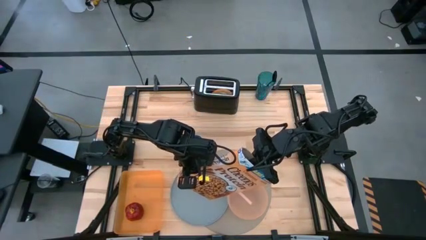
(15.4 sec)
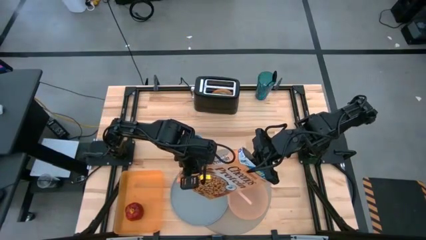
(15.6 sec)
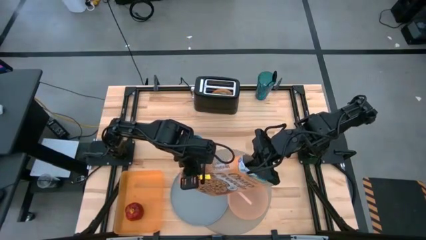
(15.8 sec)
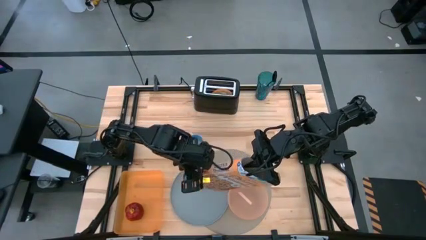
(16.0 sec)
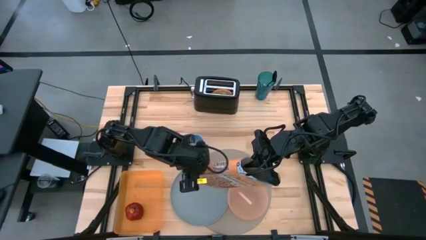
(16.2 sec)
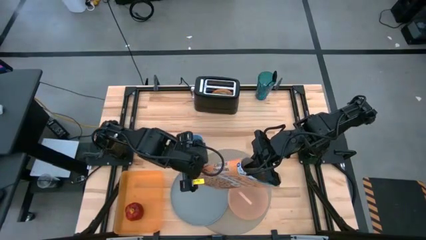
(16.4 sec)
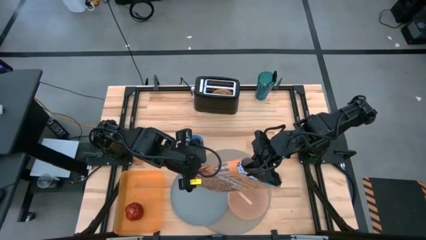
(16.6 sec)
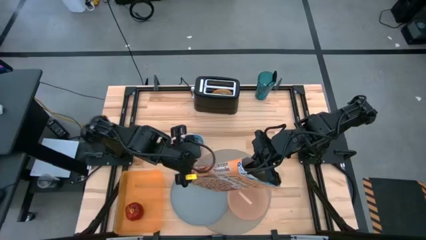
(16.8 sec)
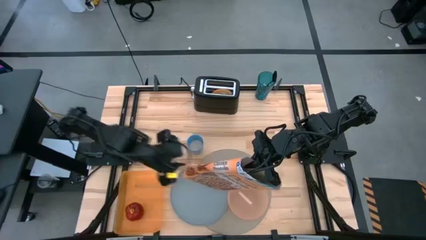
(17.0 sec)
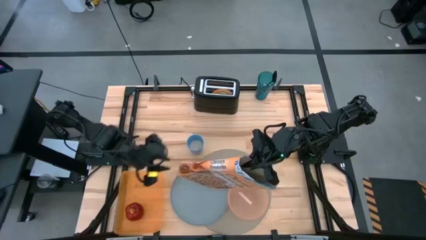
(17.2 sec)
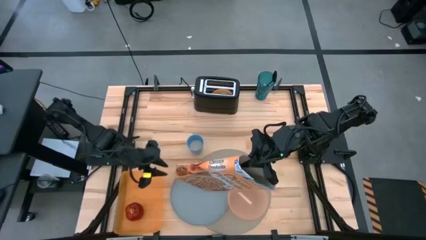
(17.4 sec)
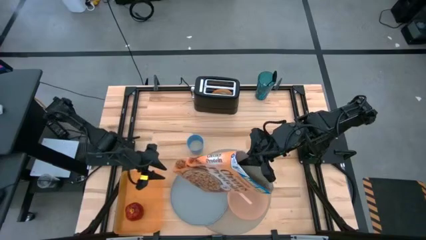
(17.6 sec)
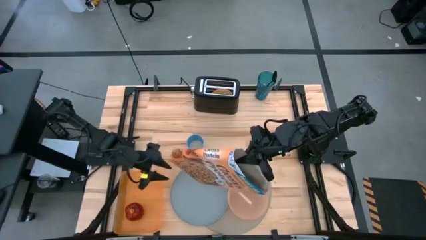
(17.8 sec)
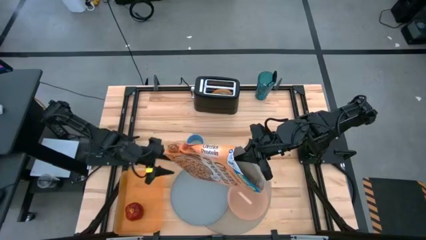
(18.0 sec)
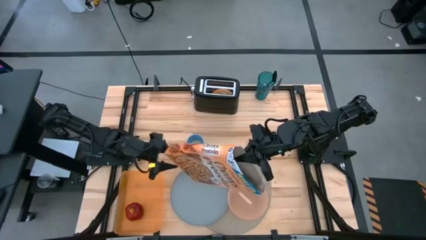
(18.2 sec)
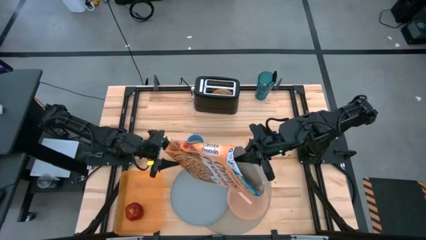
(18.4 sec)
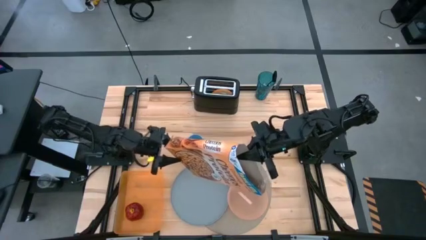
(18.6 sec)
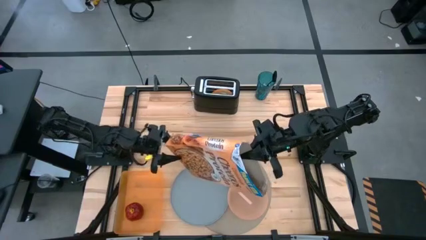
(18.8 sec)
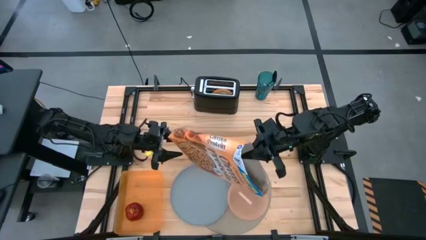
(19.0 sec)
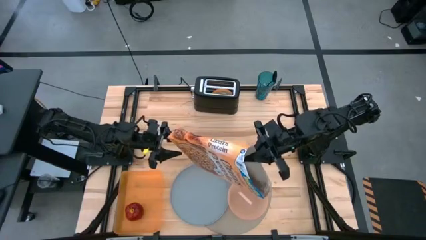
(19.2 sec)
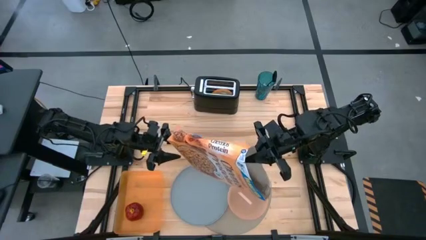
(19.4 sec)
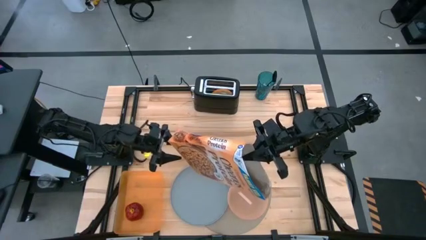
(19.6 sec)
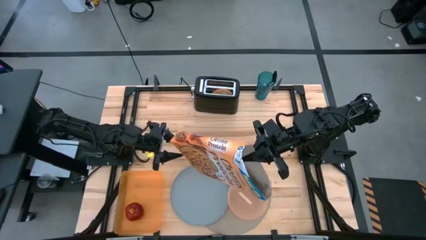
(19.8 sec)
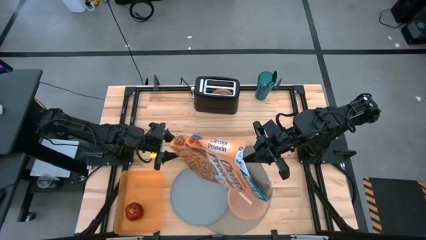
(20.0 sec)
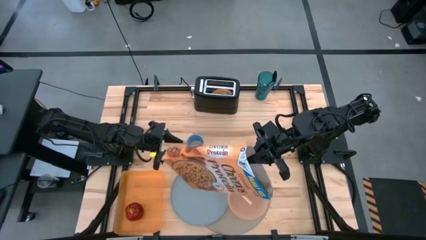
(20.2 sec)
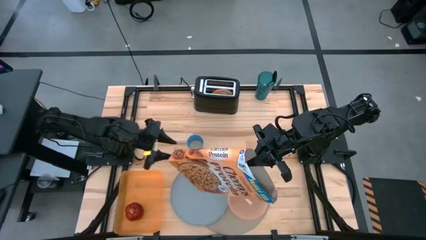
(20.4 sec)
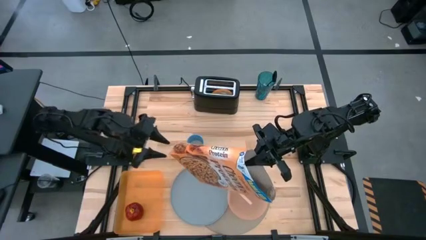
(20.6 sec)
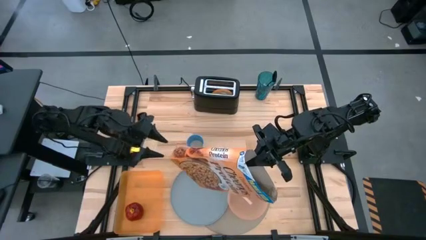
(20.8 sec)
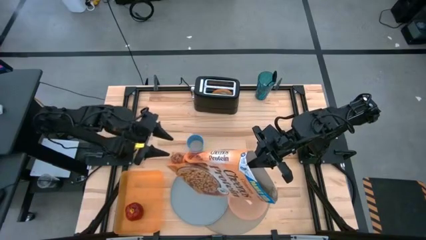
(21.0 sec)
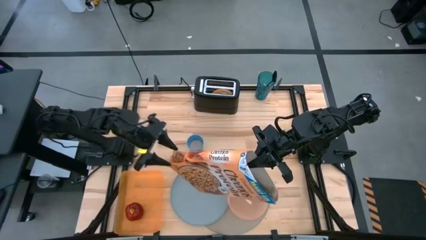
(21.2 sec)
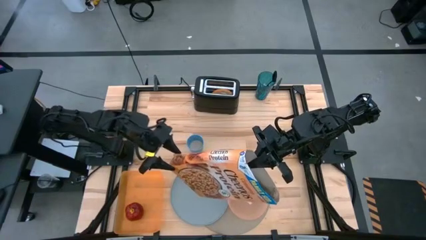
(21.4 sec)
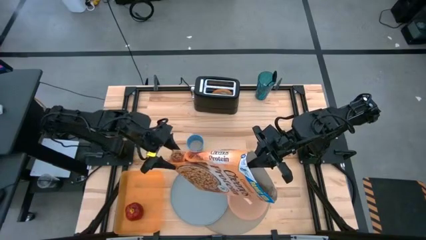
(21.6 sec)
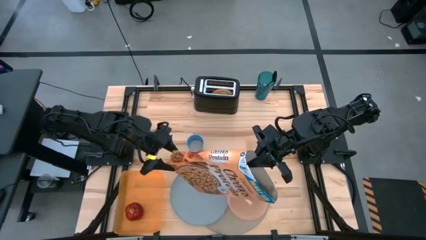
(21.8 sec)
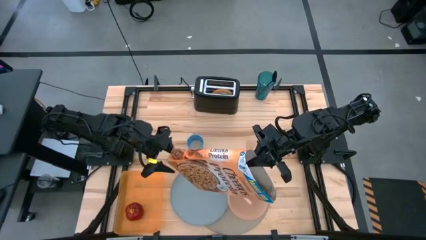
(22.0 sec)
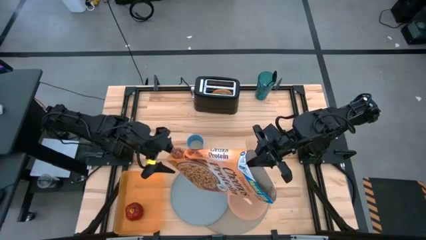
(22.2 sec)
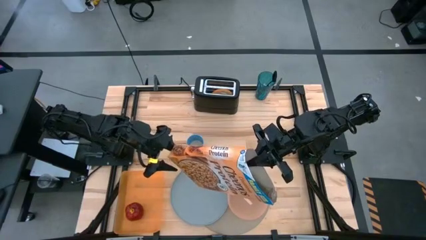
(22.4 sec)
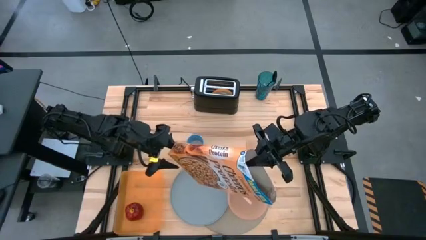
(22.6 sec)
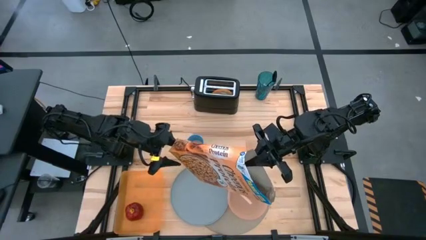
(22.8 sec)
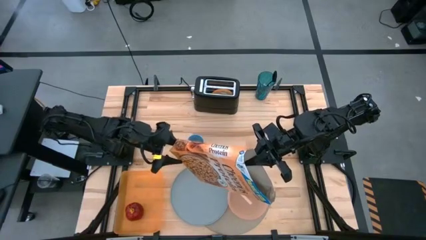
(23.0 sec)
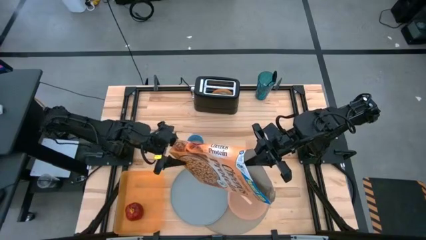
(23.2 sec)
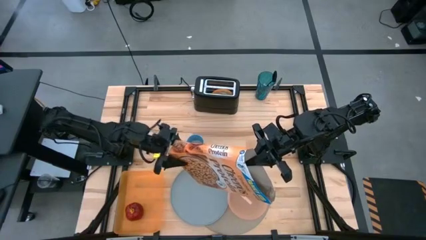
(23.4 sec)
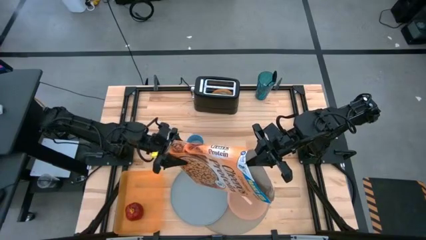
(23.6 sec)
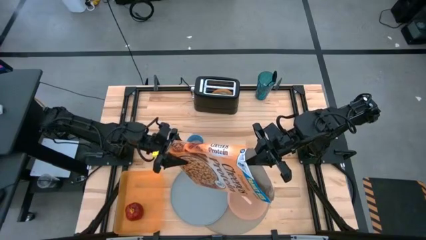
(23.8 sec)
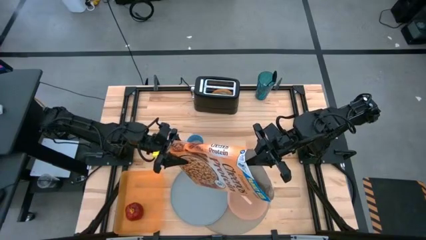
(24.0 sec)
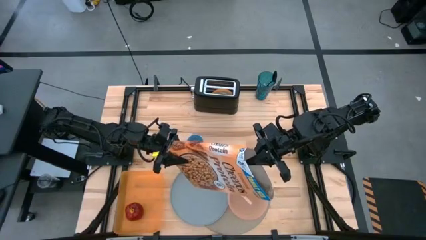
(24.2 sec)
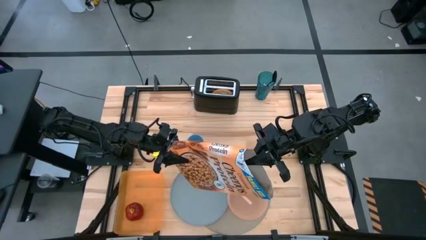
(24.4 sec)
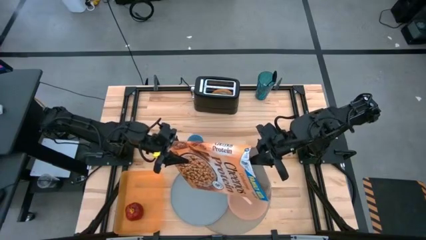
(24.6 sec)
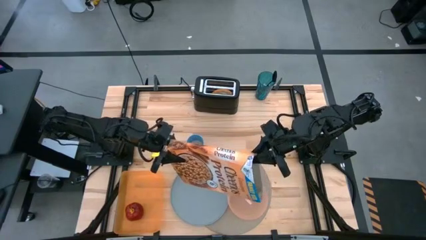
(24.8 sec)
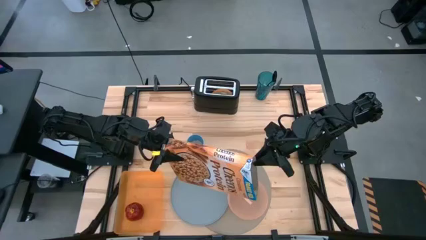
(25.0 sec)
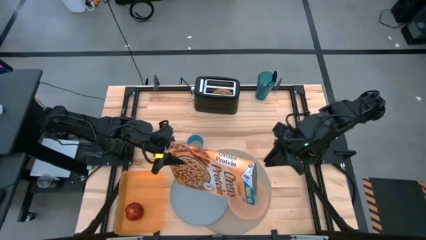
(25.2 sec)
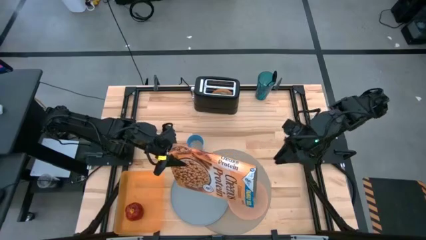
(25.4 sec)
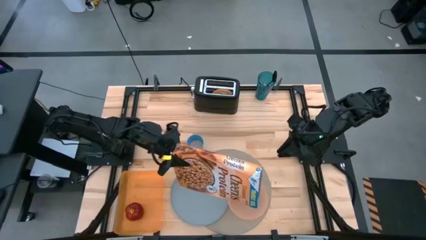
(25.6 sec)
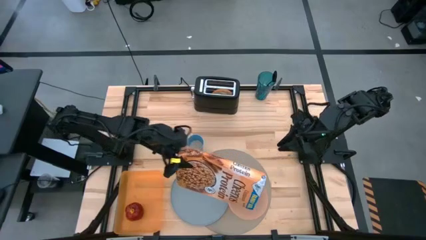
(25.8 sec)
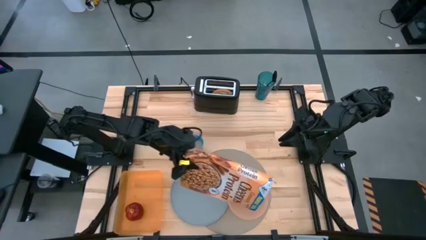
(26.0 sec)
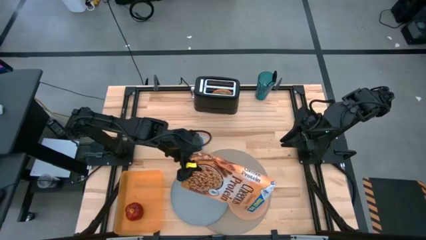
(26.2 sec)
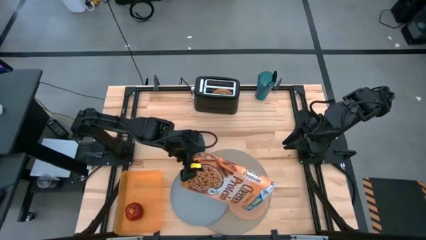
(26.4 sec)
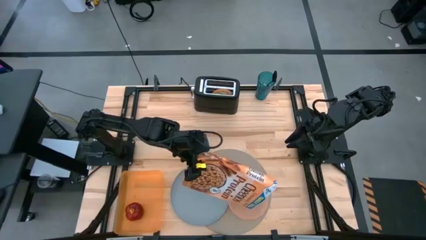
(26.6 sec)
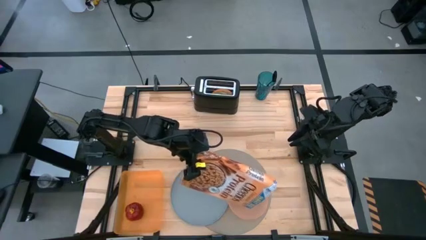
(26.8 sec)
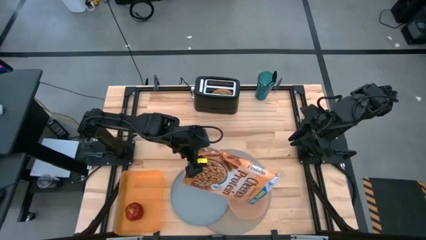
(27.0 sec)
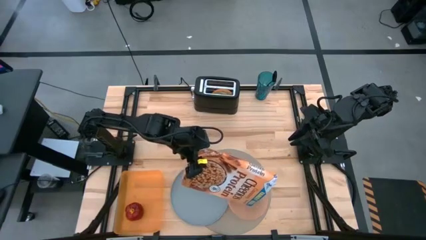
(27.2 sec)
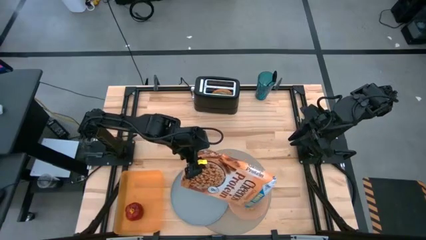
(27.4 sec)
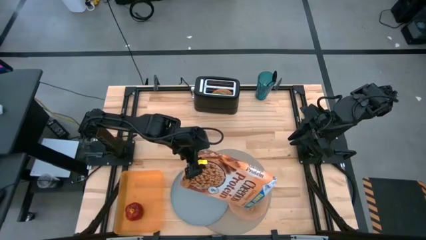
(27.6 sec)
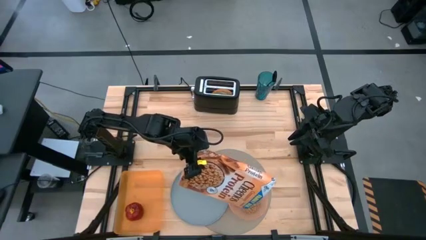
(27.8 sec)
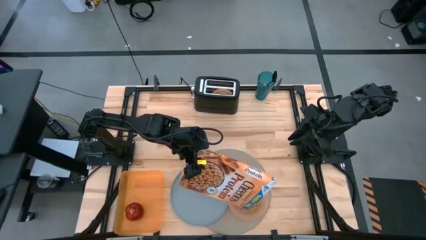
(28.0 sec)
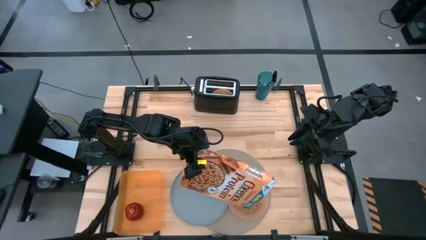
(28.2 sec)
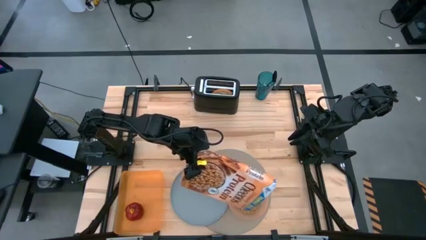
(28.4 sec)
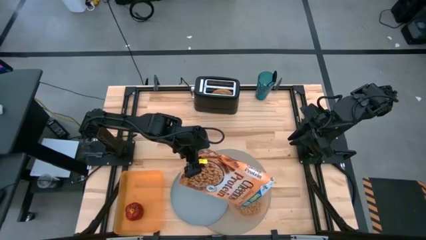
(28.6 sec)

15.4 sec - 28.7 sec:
Task: Arrange a breakfast setting
Pour the cereal from the cereal box into the orange bowl
